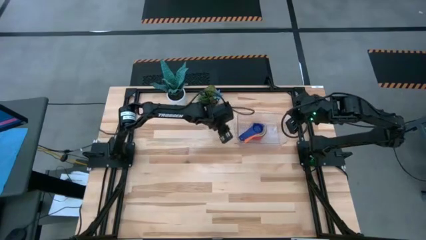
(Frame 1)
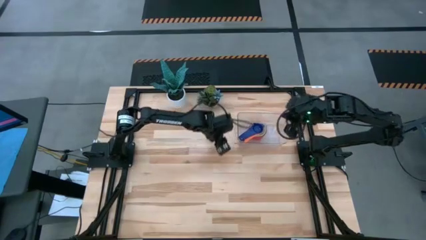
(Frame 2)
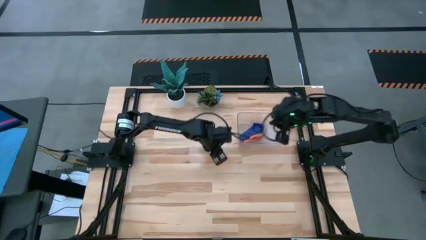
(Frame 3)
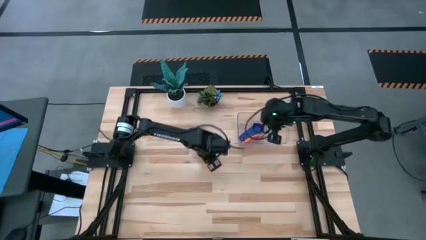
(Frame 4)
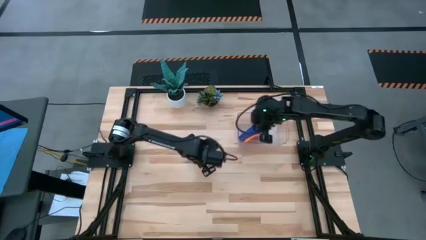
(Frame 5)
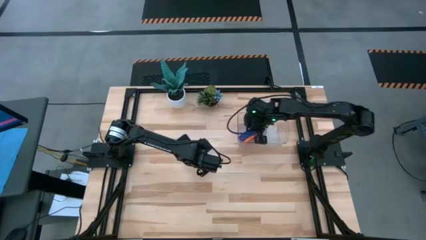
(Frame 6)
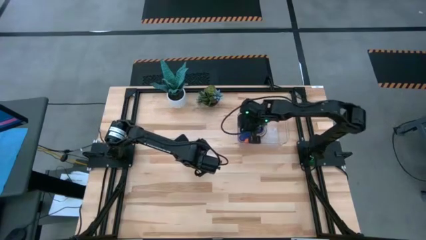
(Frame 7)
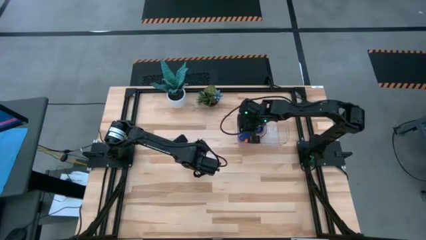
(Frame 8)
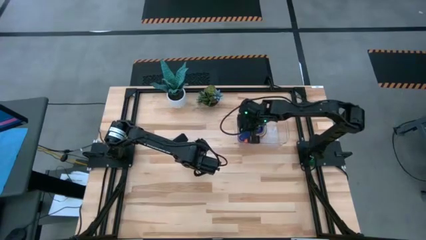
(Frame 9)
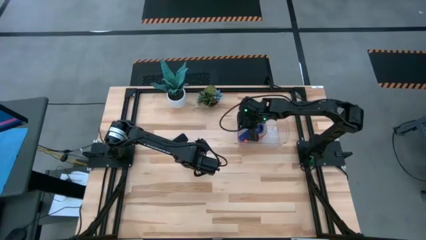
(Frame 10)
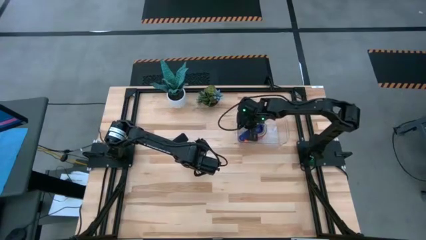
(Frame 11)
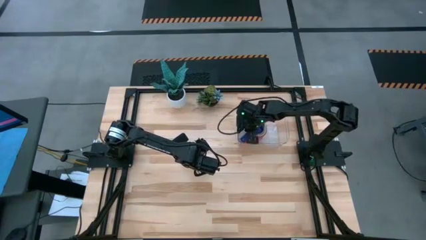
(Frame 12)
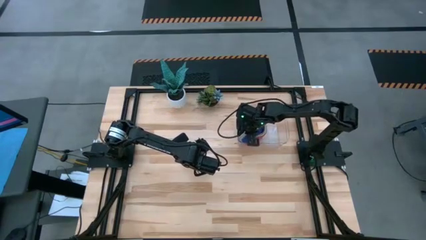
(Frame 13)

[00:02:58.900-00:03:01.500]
Task: Nest measuring cups in basket
Adjust the stacked measuring cups in the transparent bin

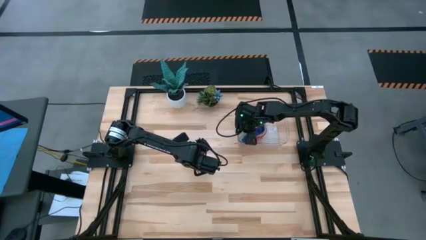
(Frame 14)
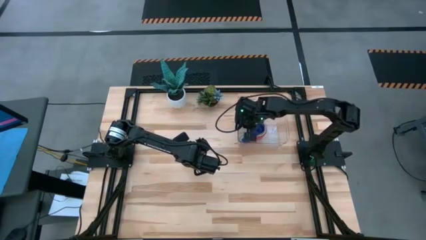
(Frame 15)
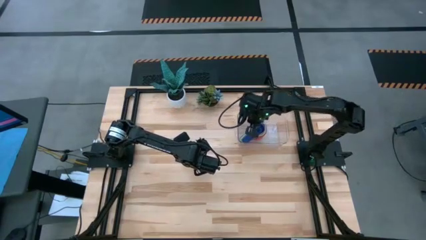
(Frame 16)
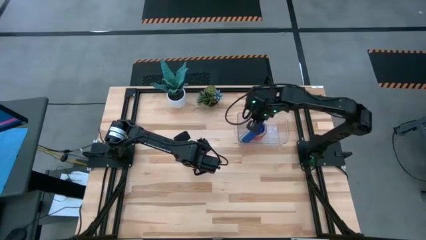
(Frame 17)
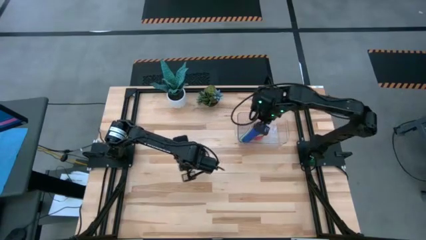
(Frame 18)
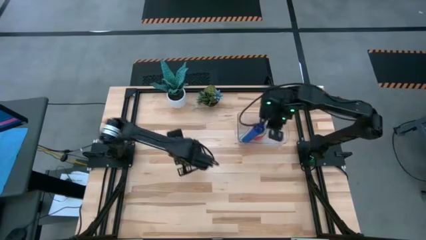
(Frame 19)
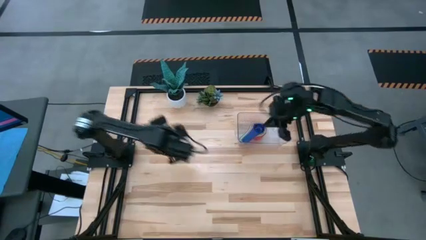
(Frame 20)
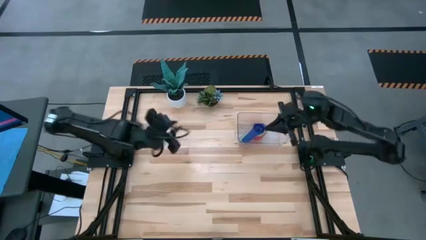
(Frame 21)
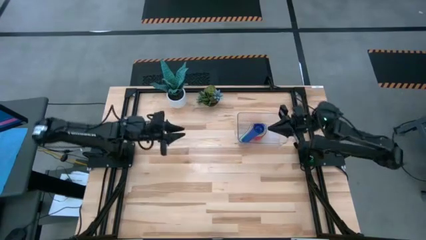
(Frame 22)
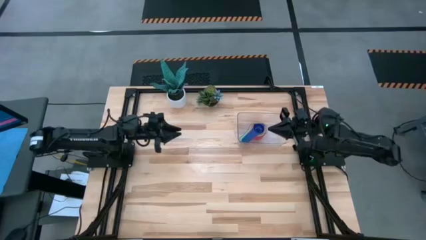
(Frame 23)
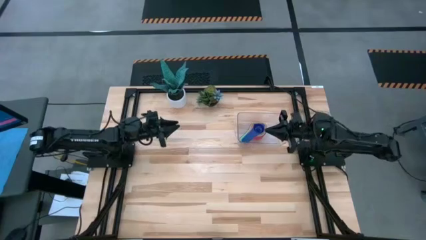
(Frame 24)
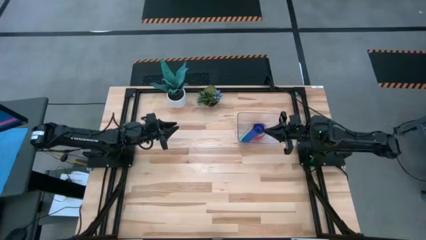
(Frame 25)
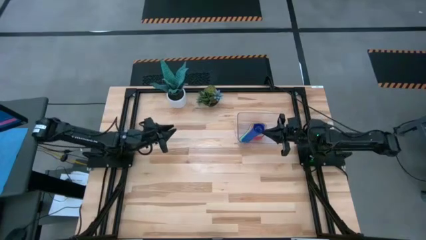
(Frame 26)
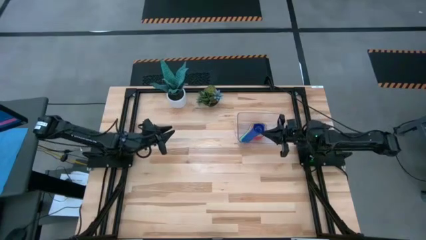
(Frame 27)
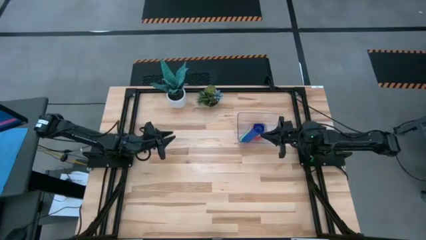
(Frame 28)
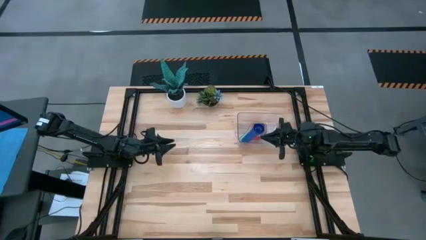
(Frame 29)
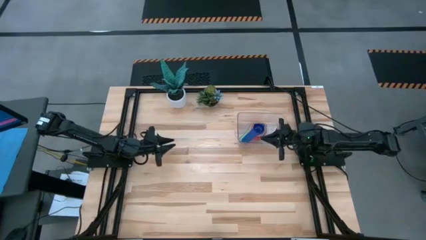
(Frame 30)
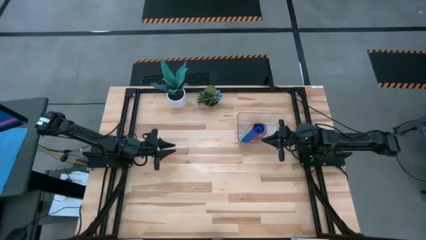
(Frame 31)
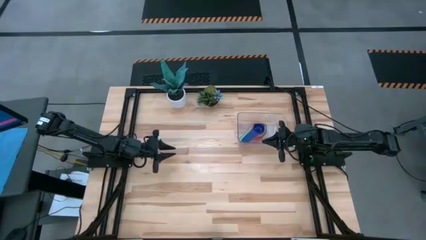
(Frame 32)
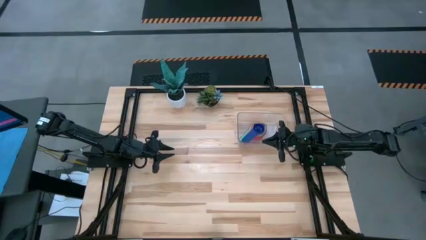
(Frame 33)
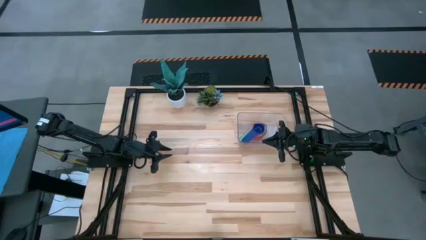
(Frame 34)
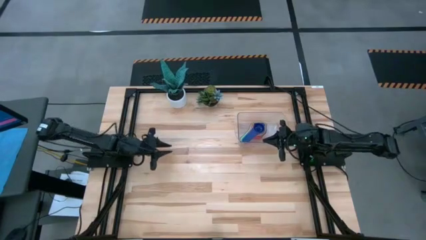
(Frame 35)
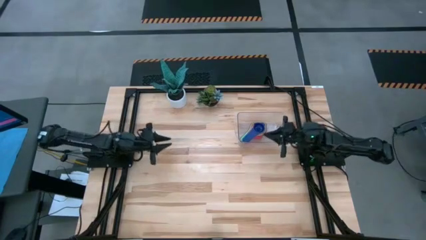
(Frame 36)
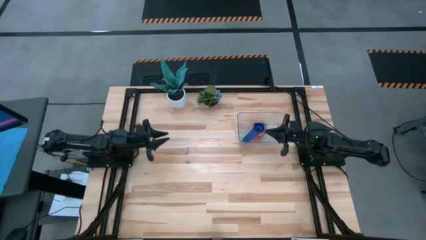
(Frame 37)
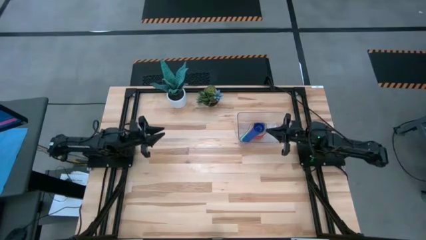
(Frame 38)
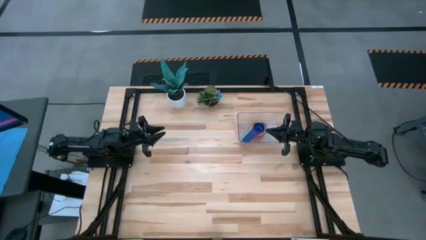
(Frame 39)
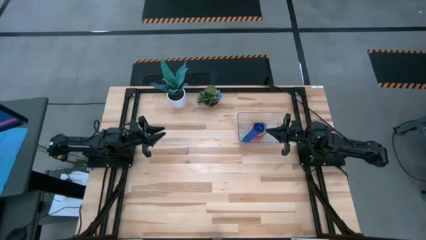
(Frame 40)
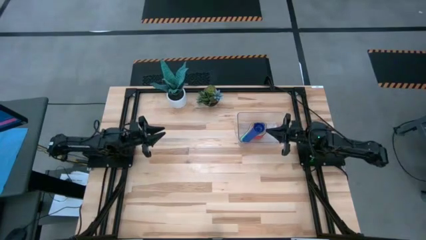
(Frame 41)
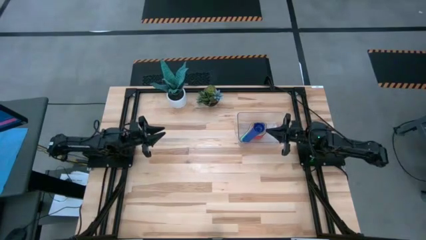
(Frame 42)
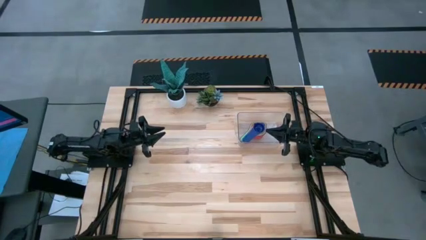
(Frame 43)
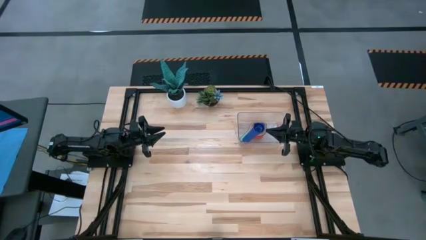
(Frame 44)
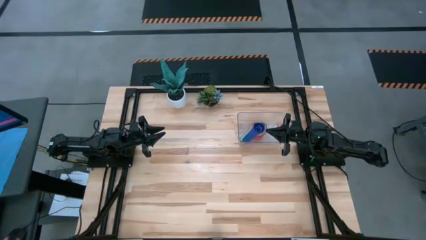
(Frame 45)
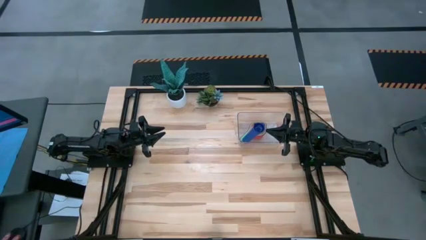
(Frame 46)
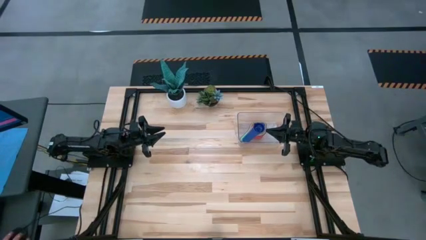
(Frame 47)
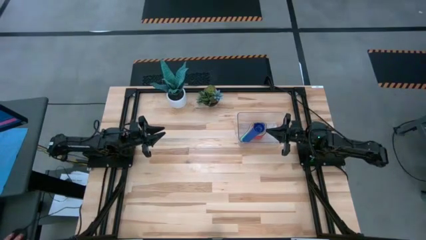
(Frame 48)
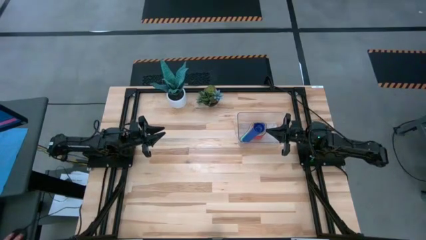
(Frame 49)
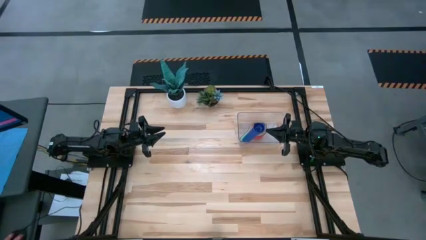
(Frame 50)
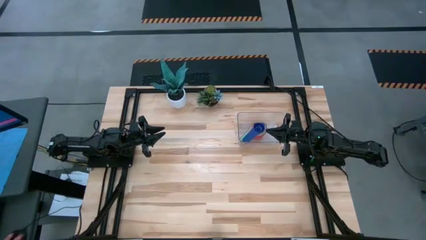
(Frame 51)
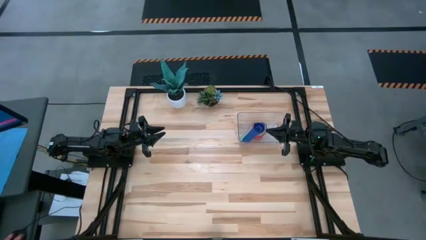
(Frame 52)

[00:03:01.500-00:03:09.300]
Return to Home Position

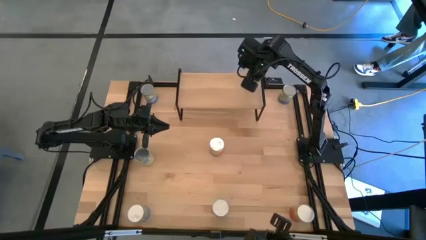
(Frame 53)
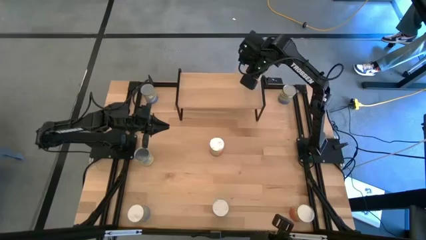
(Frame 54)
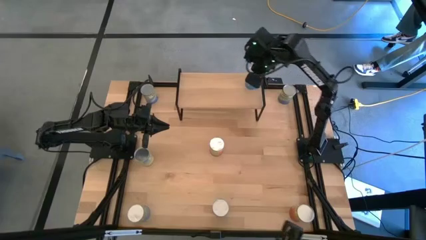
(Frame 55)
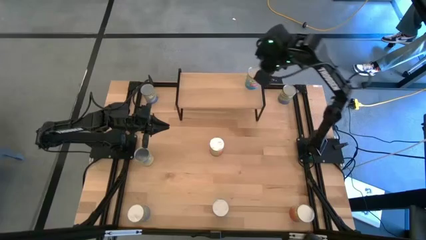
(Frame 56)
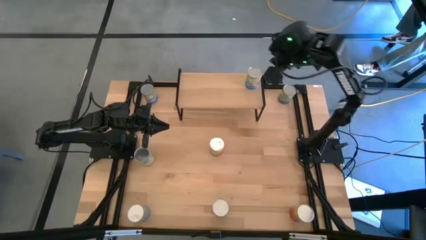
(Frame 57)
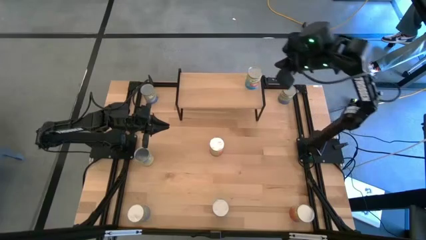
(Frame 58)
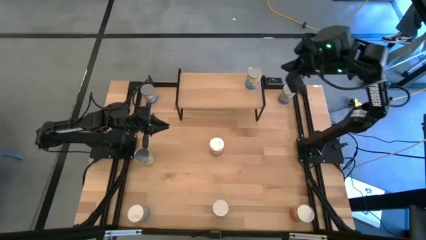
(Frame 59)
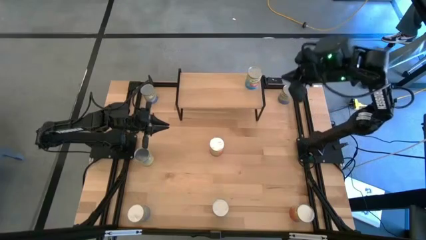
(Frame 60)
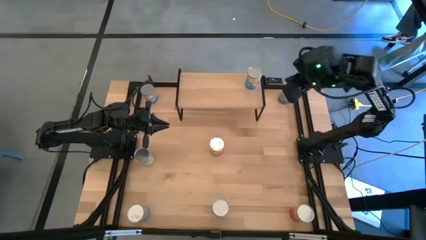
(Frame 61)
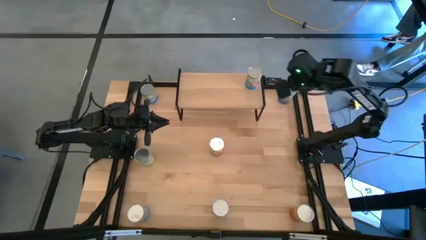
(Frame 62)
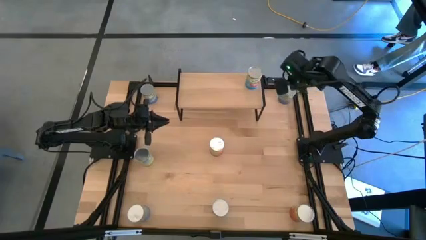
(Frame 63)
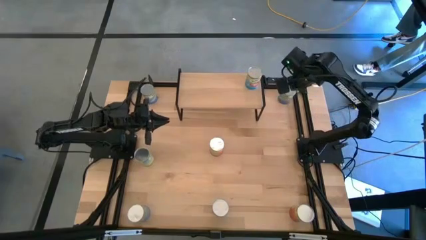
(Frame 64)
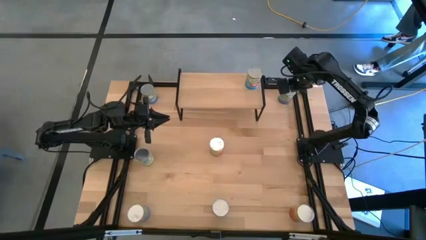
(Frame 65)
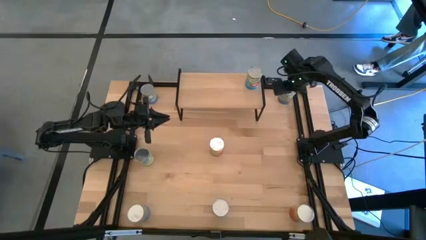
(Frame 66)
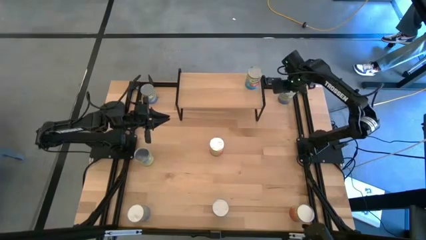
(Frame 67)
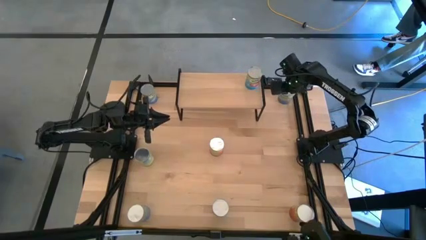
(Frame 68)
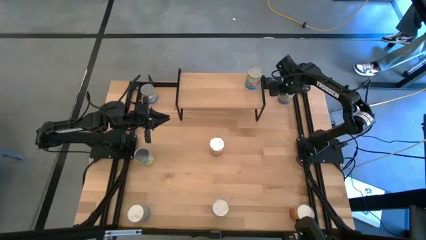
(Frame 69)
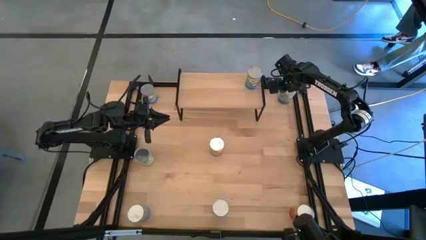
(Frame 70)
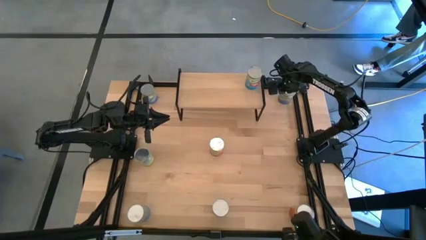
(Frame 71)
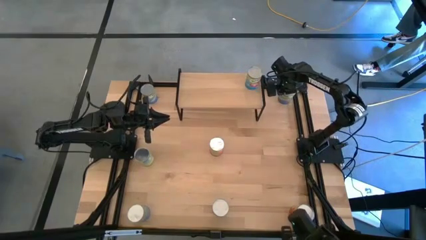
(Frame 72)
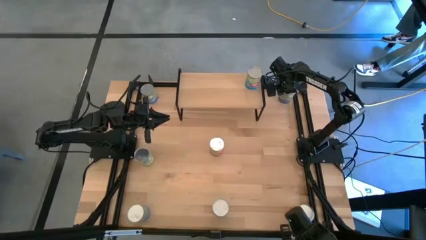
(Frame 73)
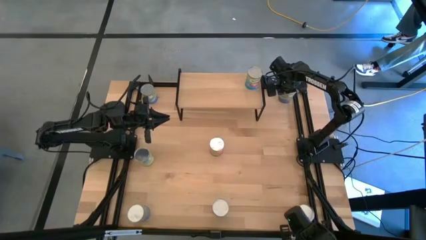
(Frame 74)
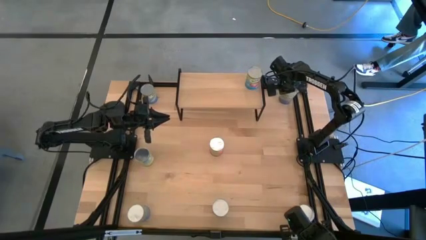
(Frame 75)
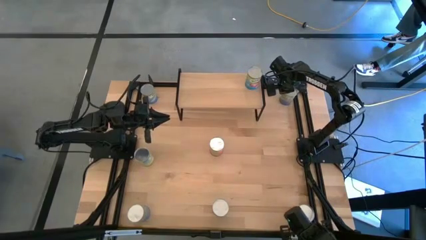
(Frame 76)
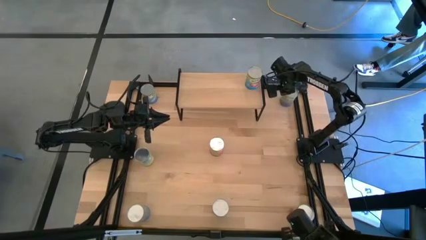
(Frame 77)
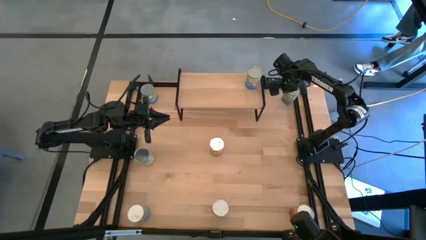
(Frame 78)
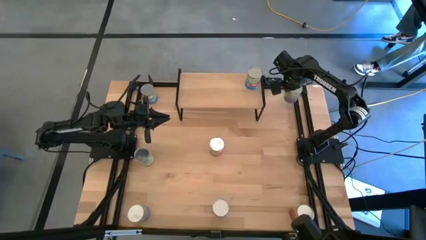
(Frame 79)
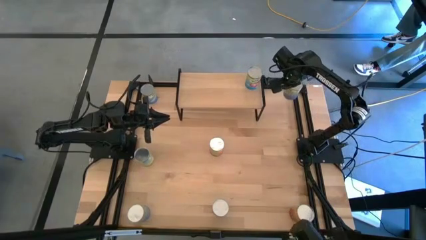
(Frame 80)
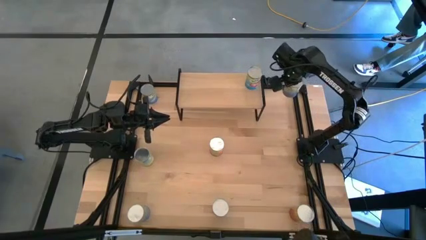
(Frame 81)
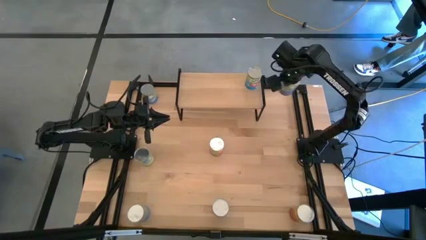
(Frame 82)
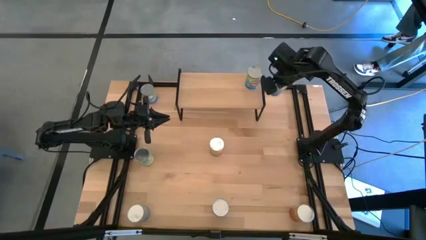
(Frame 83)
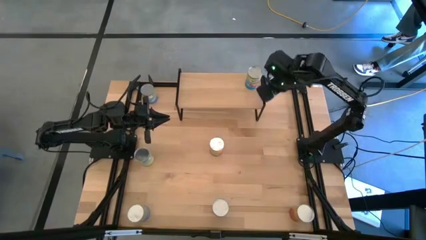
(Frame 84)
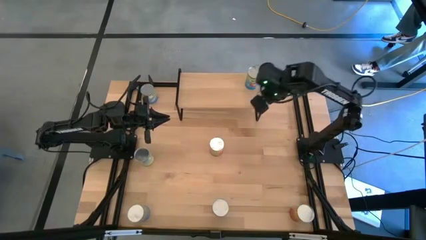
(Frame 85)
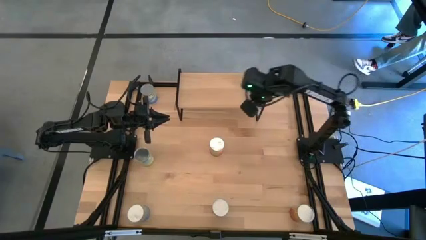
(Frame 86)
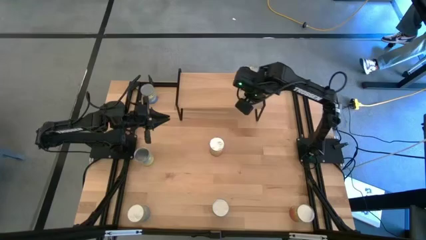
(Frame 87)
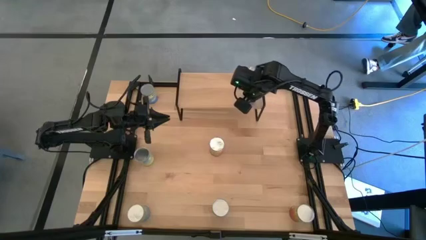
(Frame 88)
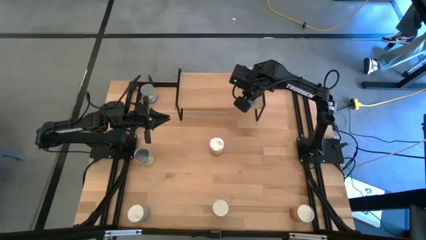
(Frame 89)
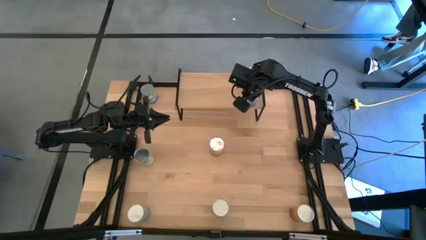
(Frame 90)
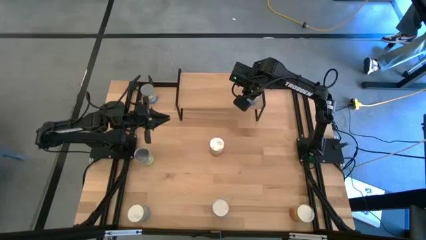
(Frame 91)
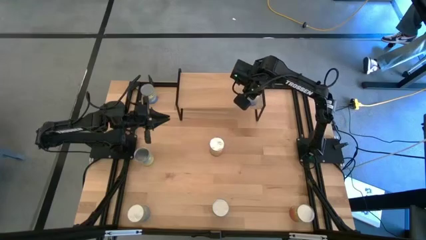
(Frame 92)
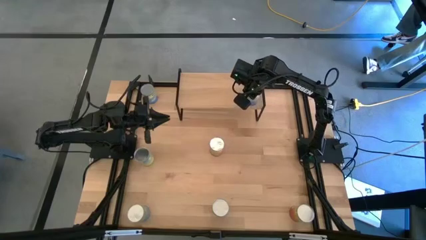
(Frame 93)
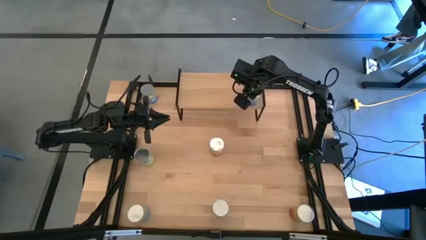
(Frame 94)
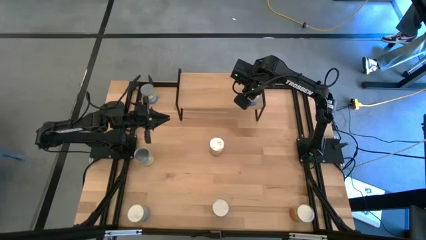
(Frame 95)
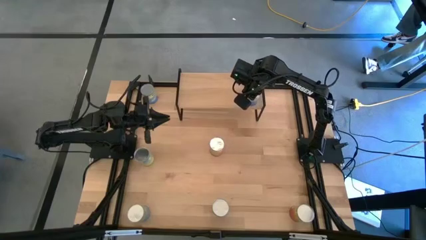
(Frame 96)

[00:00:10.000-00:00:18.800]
Task: Pick and place cans onto a shelf
Put the right canned peas on the shelf
